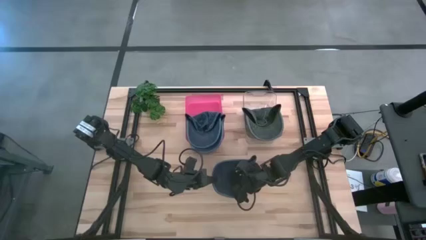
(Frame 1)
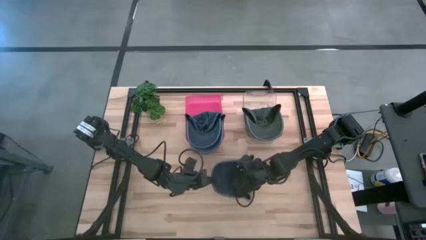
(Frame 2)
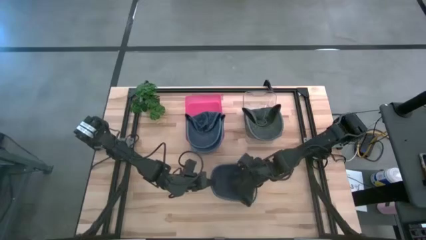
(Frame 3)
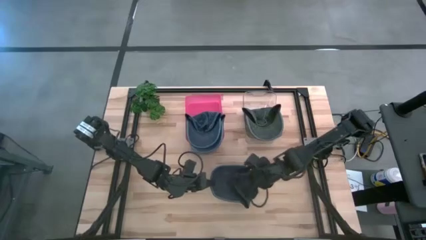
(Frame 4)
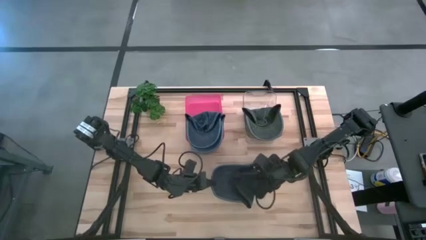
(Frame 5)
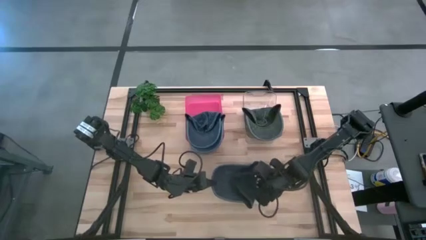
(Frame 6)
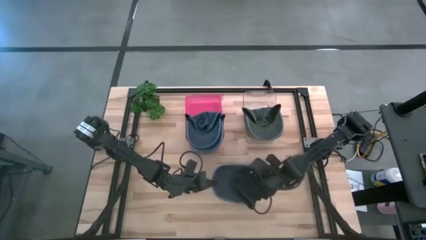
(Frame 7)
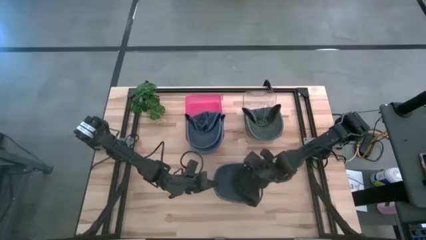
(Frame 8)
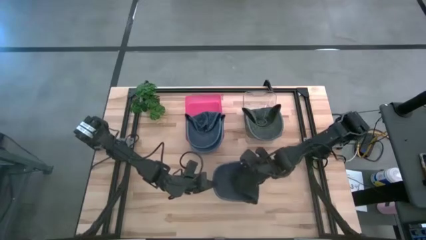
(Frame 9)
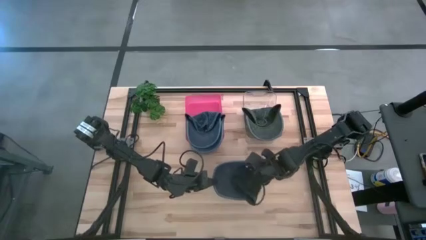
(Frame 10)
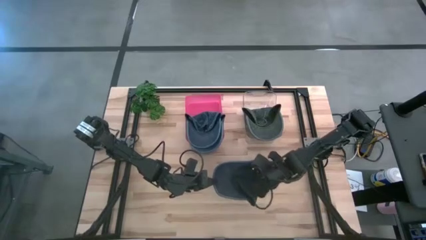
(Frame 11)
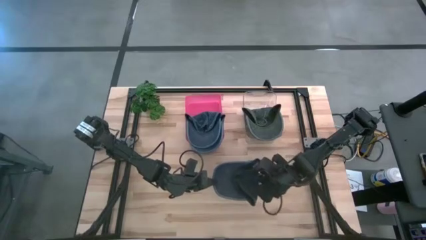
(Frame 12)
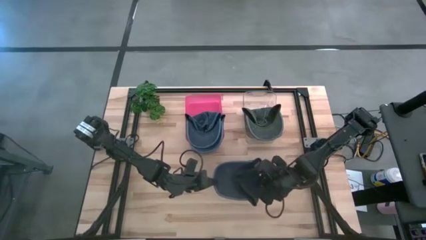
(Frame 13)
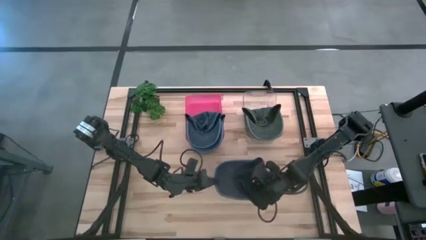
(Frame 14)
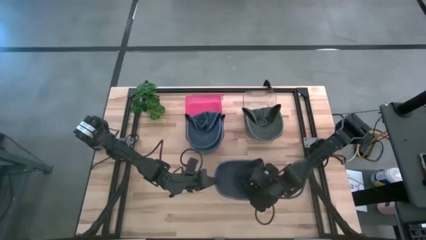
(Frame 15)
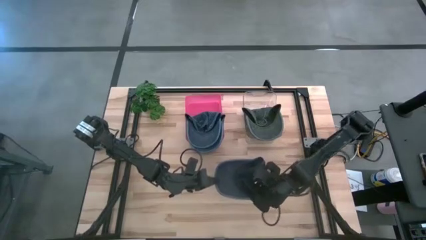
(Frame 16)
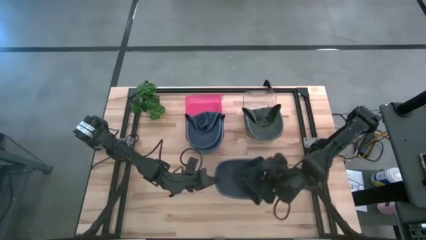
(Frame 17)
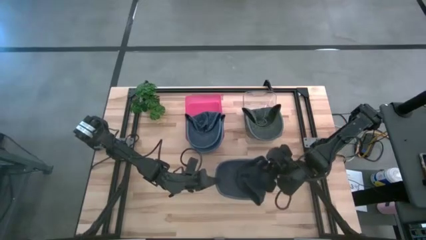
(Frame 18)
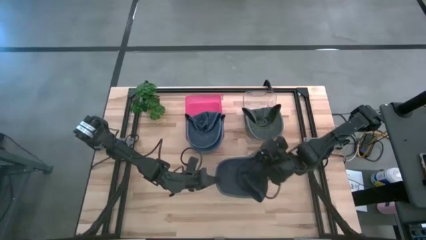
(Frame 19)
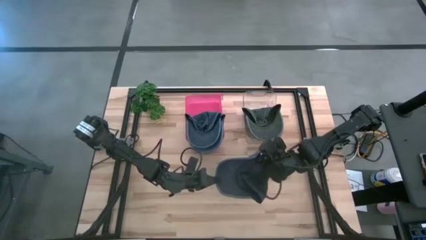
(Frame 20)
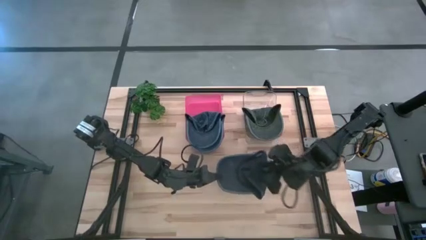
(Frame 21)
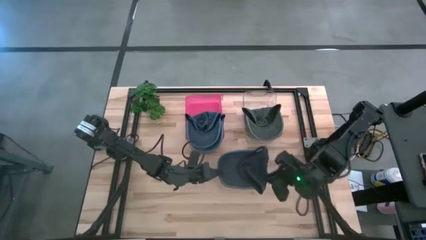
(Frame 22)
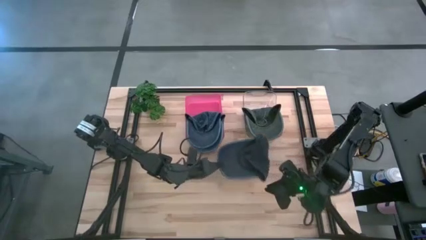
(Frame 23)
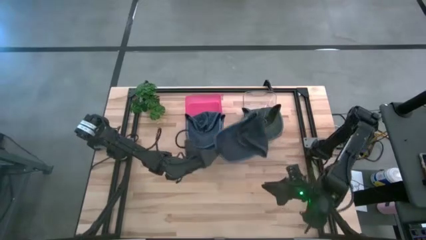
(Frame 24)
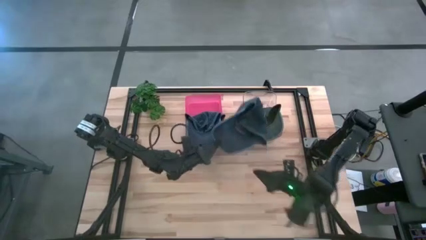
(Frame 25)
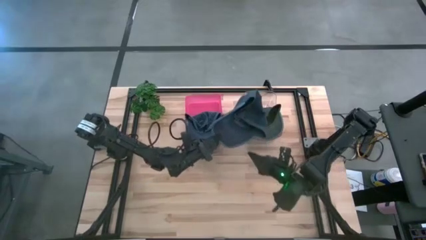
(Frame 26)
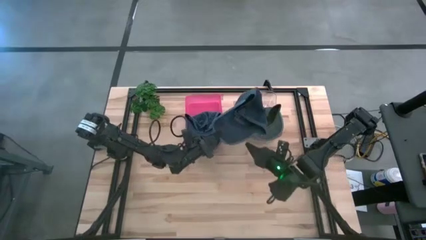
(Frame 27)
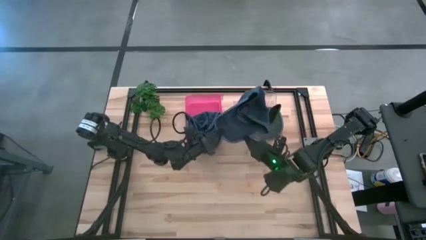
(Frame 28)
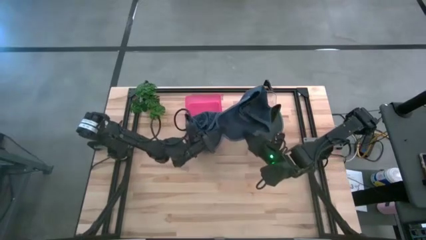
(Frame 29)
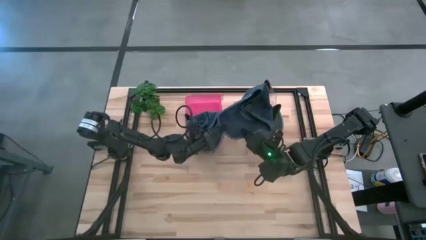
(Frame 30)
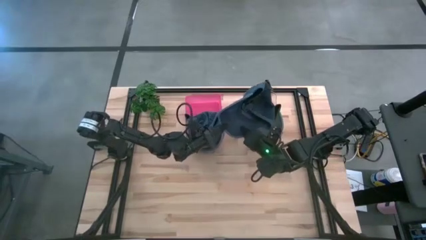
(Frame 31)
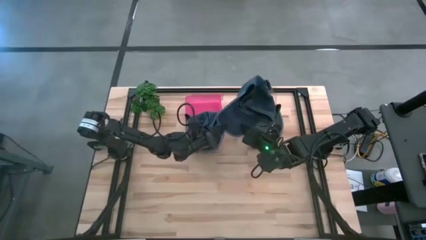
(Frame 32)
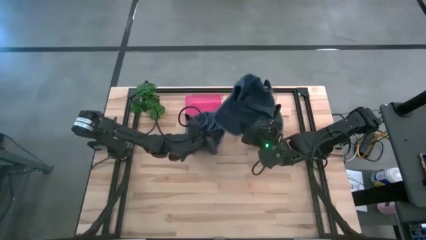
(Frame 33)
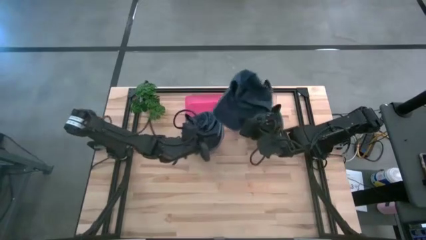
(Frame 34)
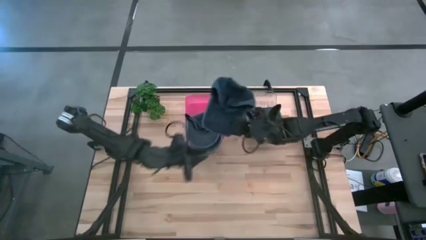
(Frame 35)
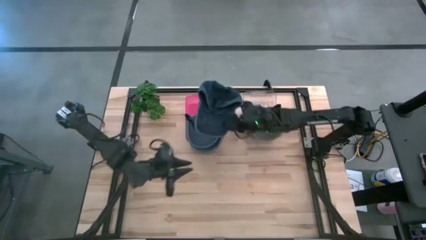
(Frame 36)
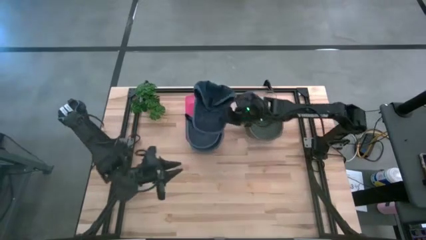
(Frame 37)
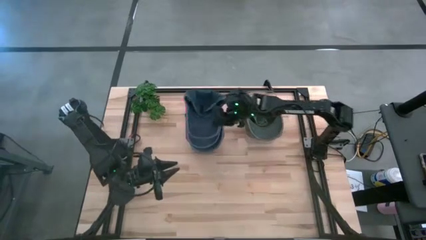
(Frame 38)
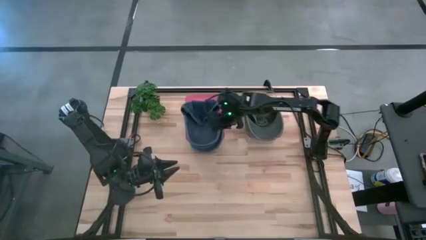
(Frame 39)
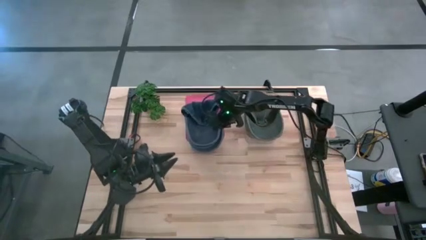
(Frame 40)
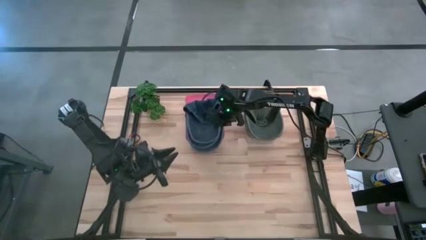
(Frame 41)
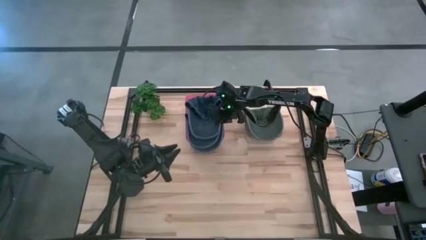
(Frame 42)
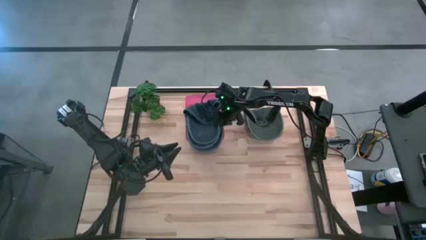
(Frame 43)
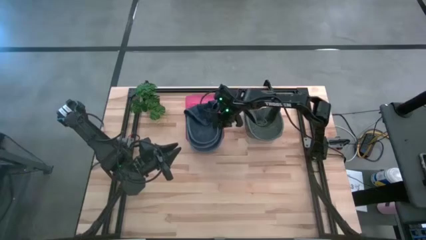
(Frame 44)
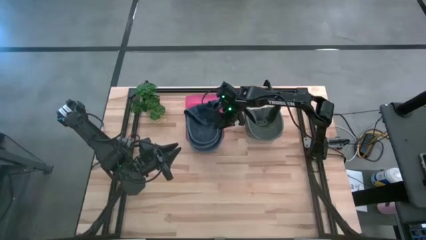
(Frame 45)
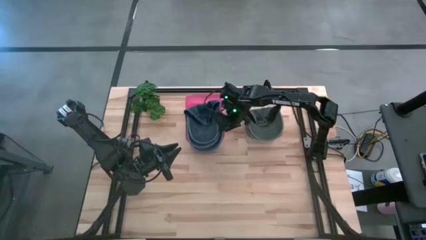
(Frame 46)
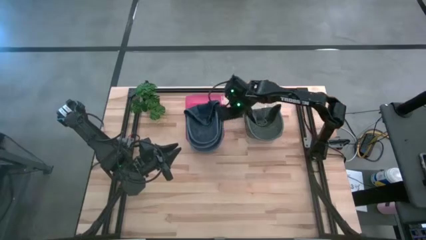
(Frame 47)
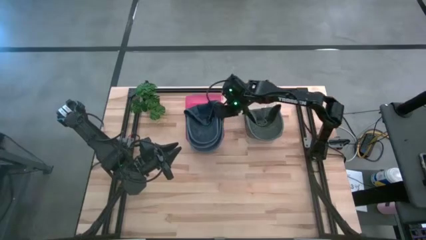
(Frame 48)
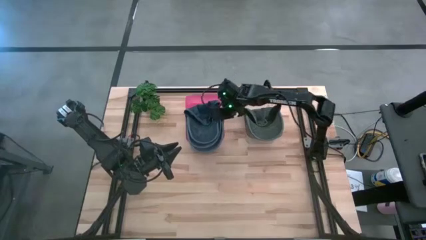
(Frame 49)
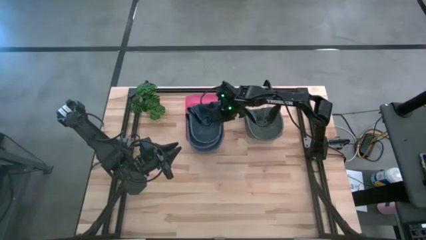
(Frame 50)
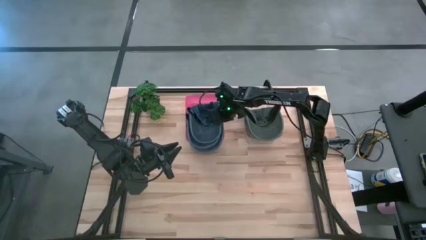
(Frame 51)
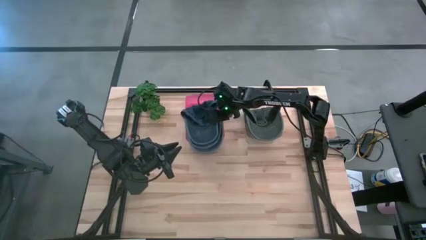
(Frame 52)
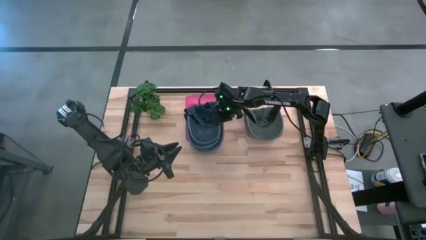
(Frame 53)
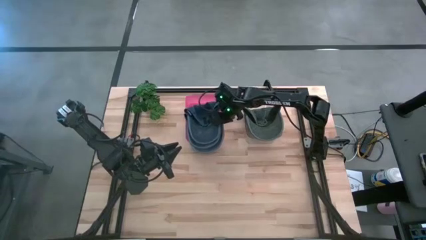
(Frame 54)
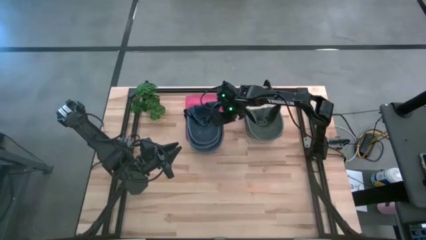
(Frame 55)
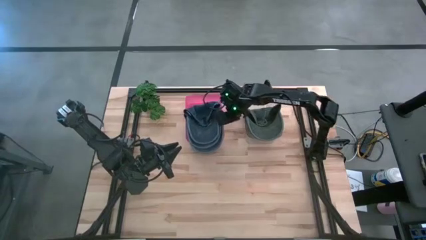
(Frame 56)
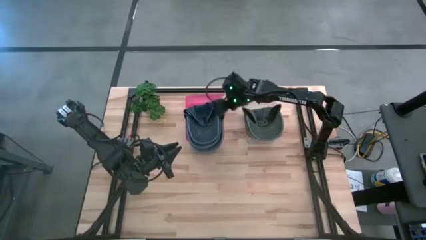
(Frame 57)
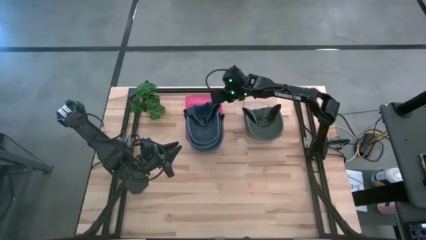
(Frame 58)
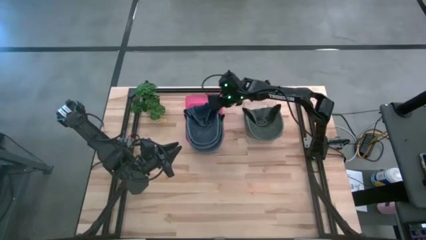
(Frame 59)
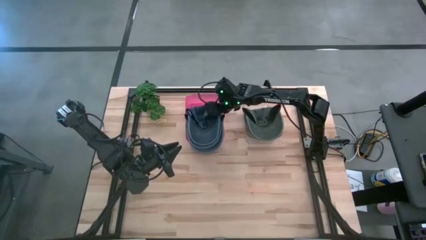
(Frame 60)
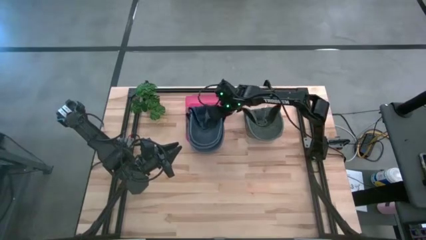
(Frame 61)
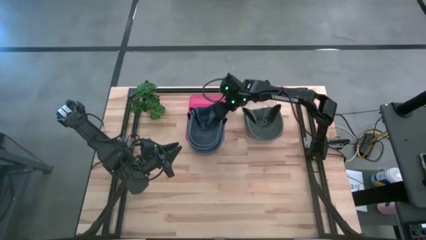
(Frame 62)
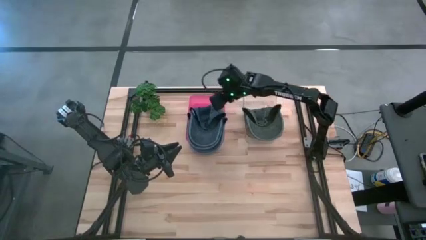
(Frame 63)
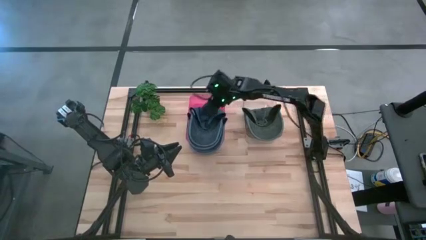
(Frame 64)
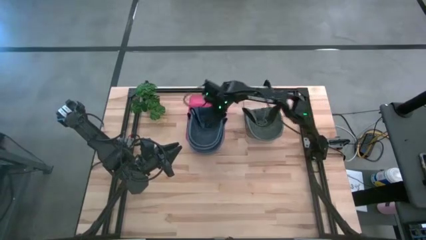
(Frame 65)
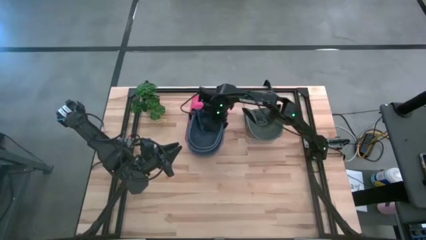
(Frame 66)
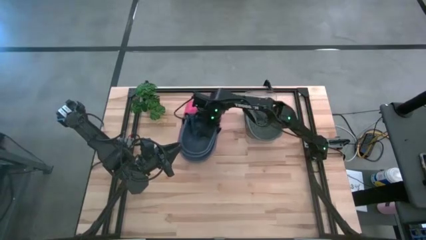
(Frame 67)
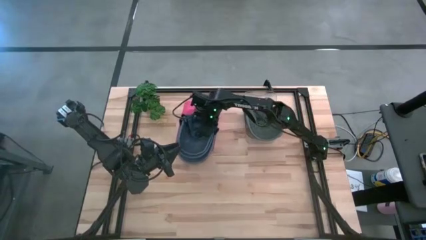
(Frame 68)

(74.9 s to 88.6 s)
Task: Pick & Place hat
Put the blue cap into the red bin

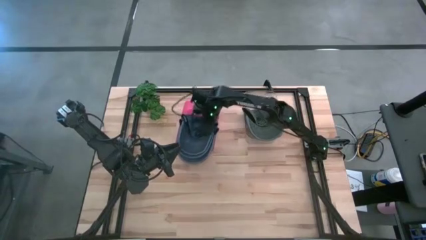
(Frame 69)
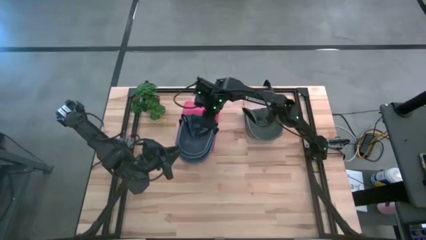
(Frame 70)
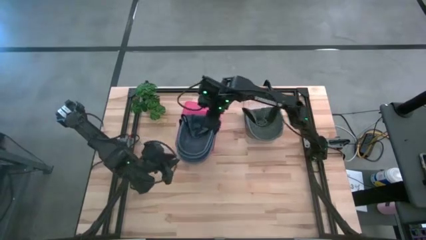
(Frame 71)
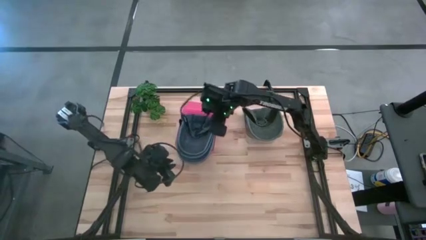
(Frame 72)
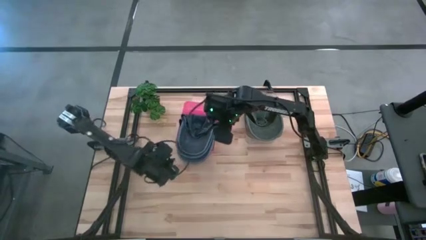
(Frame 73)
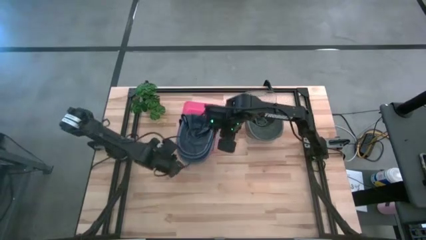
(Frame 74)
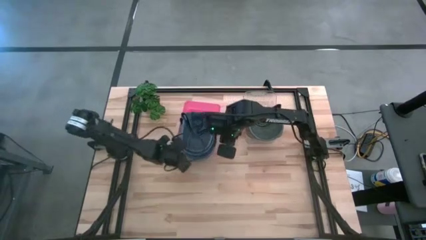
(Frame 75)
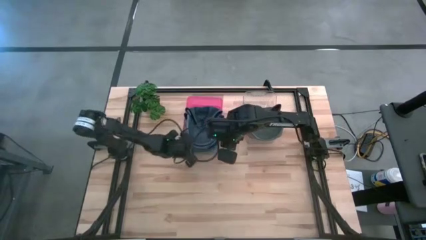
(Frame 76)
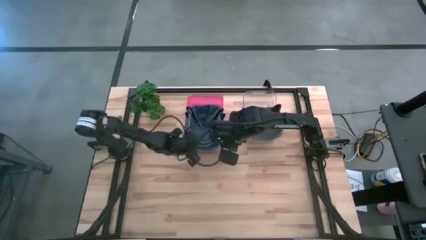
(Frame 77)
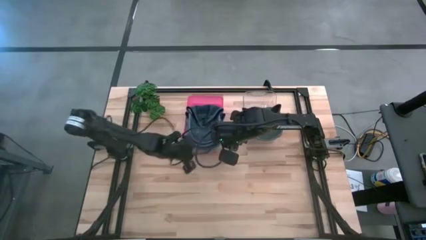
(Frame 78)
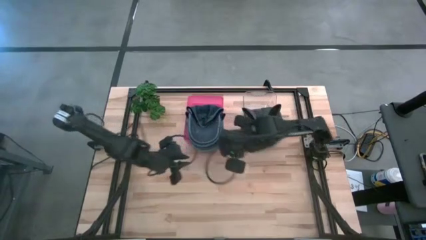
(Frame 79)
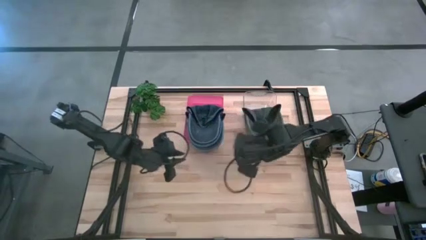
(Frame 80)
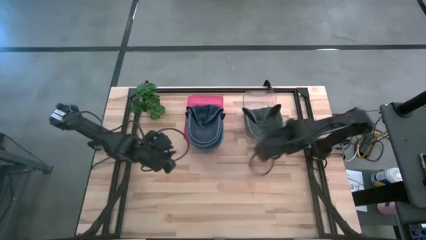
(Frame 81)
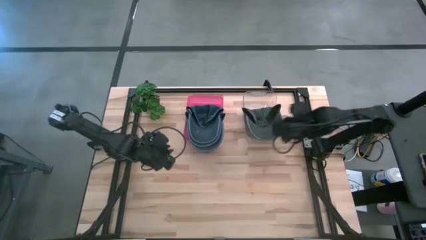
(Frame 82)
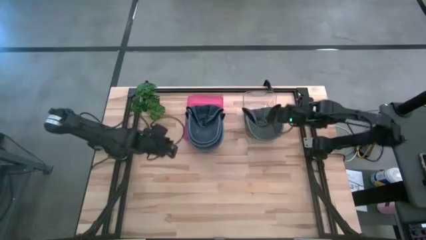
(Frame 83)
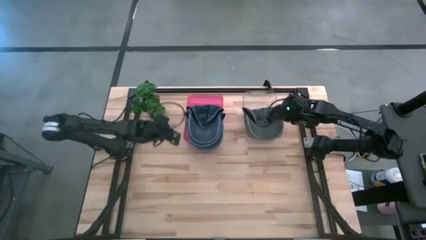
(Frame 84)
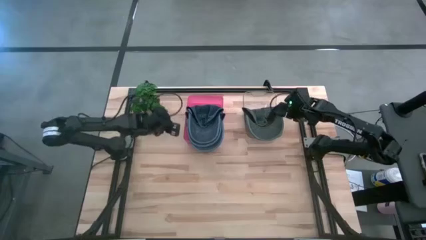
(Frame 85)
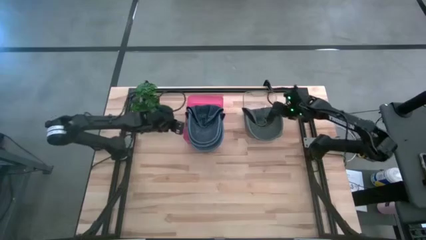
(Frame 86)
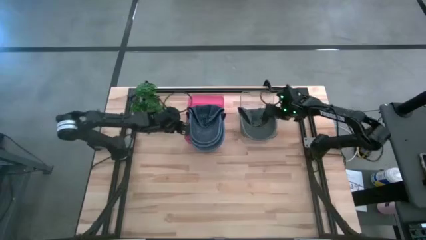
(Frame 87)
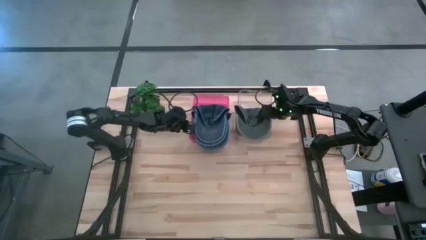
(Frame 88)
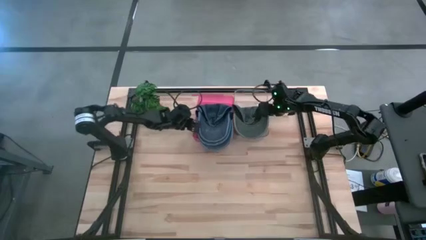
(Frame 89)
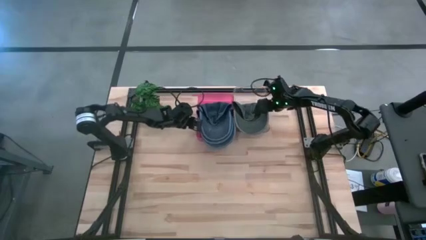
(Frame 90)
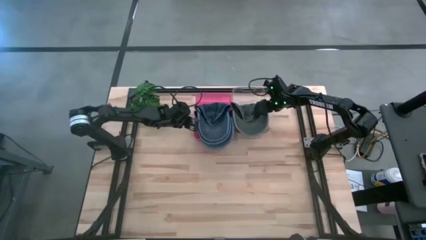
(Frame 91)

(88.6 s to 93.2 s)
Adjust the bins
